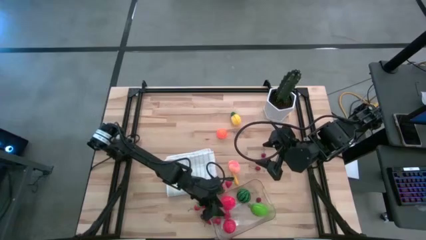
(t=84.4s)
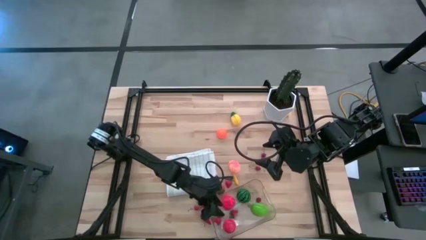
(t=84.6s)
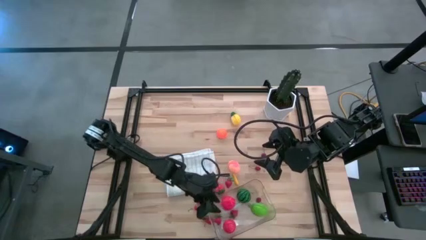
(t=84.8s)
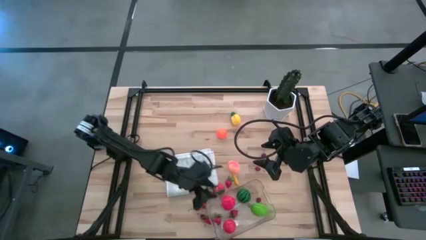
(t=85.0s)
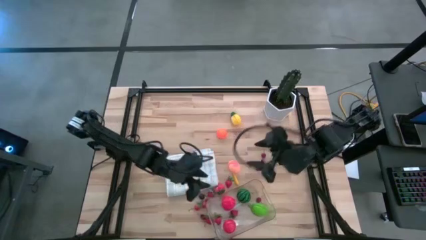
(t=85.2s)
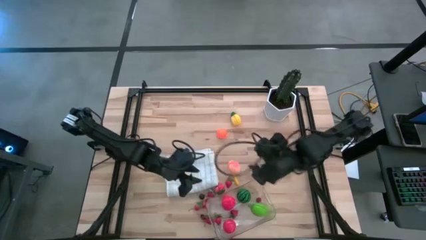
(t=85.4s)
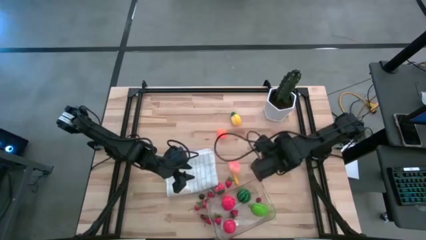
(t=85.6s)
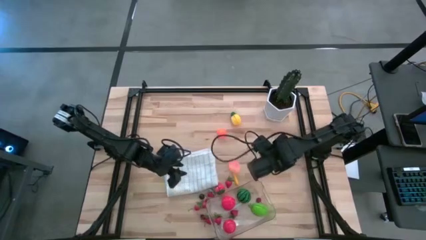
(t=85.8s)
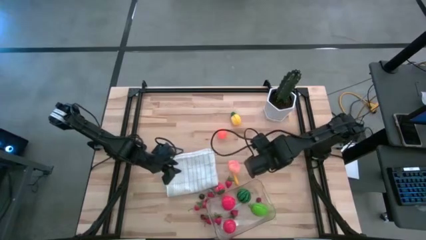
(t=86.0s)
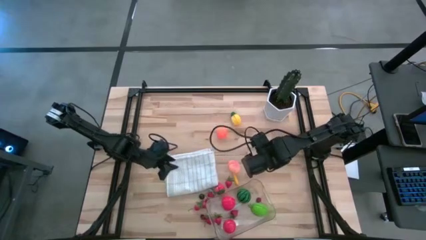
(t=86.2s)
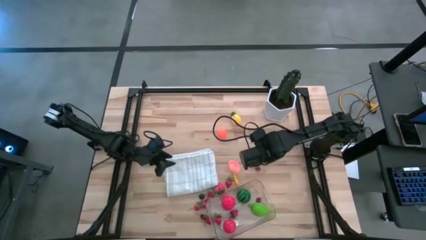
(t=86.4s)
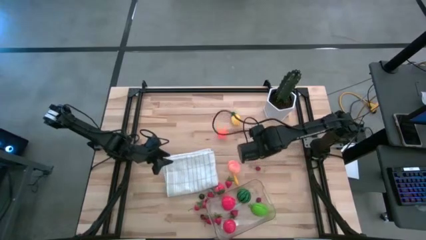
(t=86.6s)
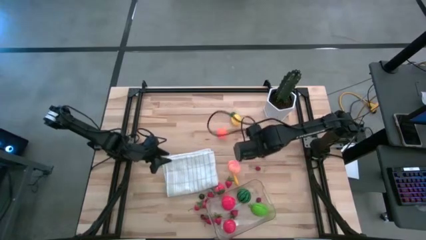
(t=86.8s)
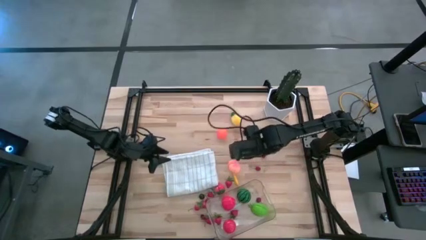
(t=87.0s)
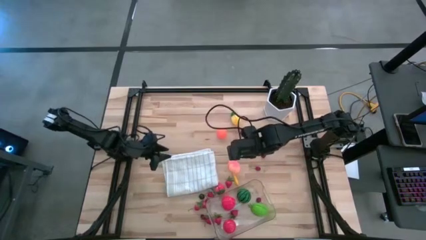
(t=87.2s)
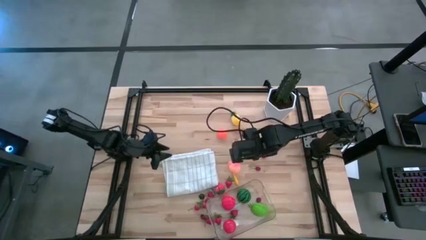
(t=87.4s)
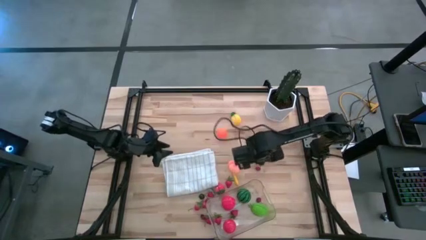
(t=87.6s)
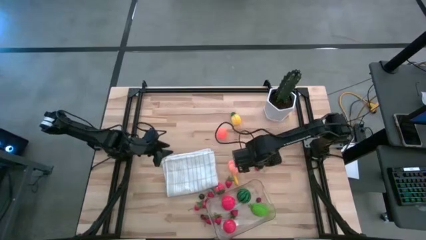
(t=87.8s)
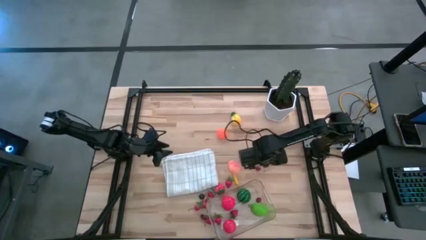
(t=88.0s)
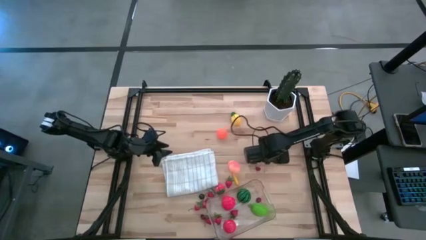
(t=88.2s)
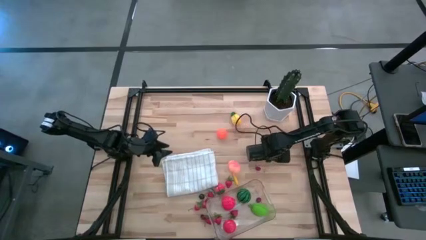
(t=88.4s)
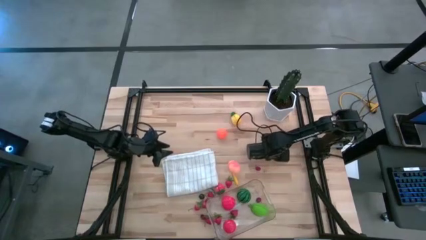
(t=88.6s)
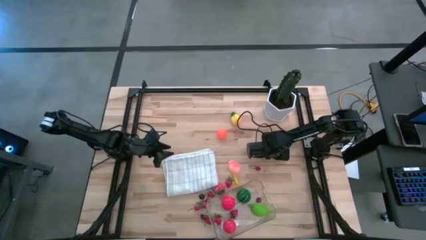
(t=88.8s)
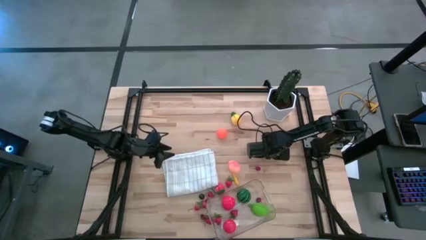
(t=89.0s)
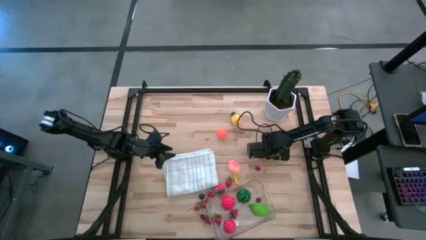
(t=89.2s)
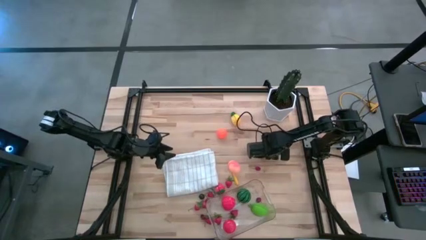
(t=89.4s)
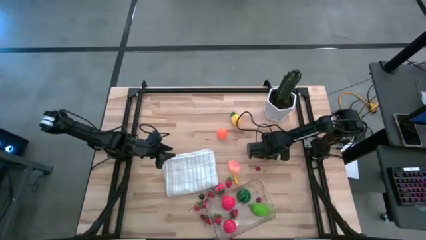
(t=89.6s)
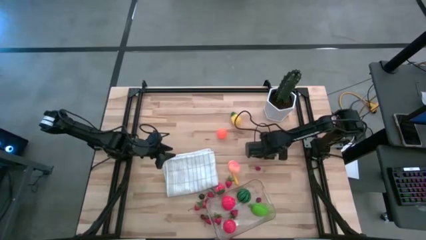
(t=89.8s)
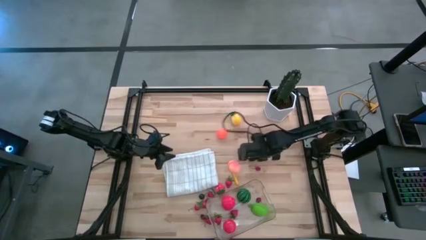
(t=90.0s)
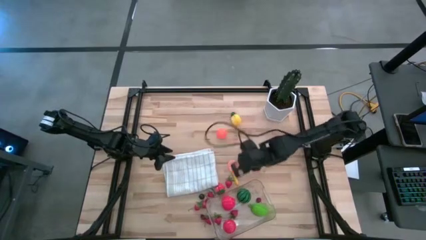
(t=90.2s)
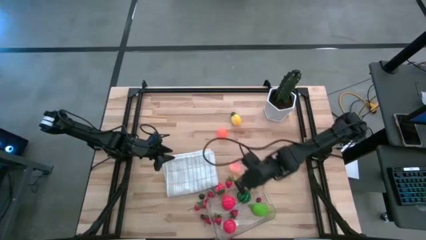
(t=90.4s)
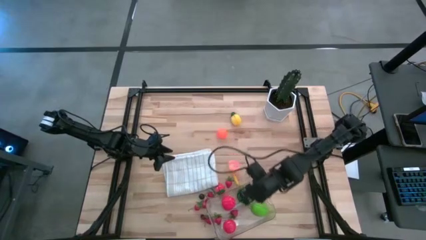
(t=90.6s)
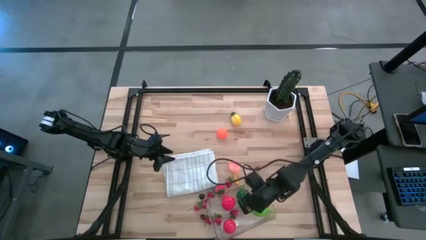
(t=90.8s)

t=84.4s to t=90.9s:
Task: Pick and placing Produce into tupperware
Put the red cherry into the transparent bin

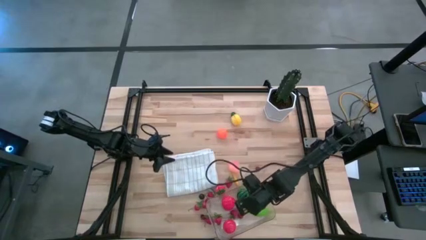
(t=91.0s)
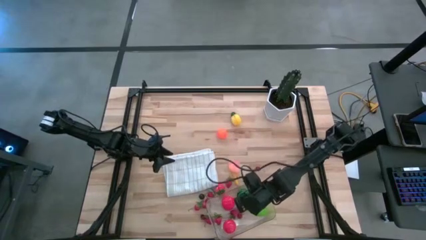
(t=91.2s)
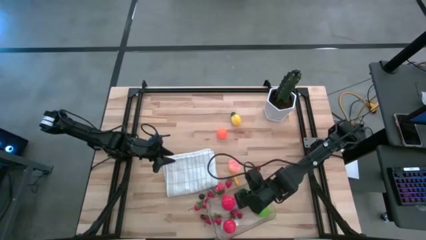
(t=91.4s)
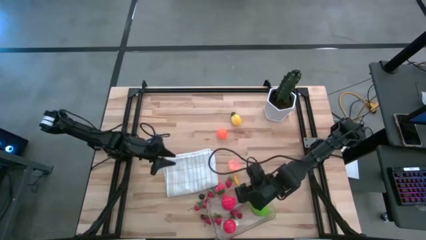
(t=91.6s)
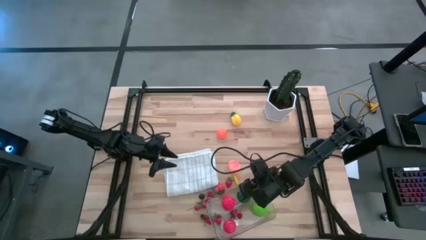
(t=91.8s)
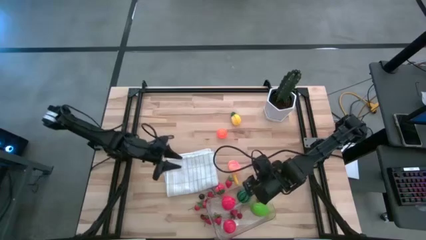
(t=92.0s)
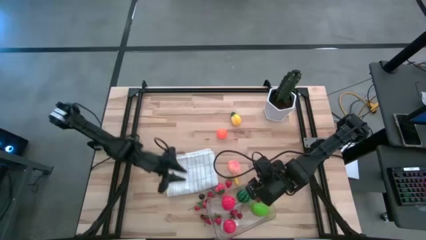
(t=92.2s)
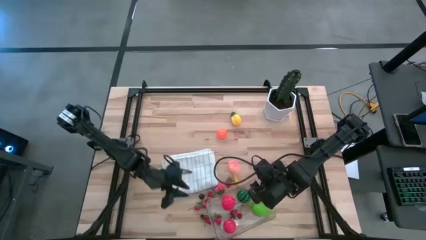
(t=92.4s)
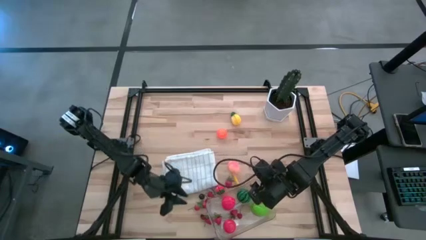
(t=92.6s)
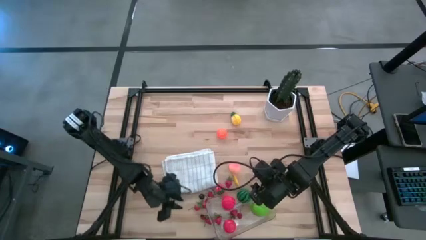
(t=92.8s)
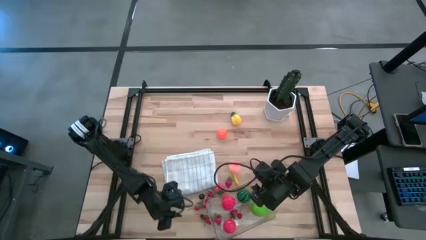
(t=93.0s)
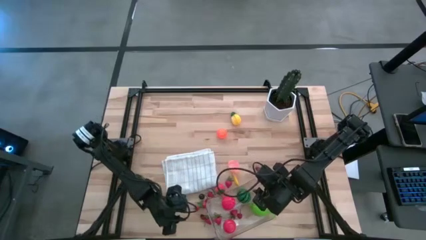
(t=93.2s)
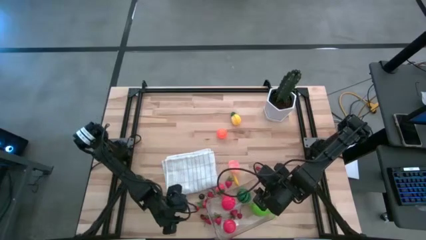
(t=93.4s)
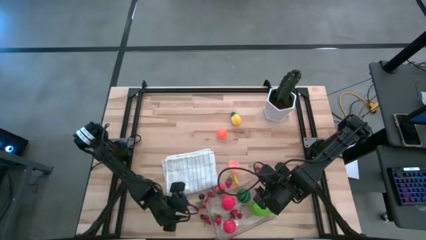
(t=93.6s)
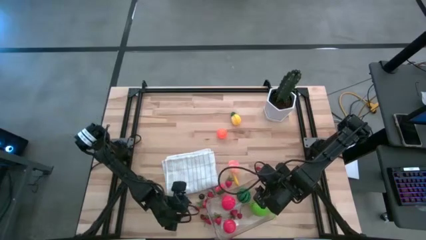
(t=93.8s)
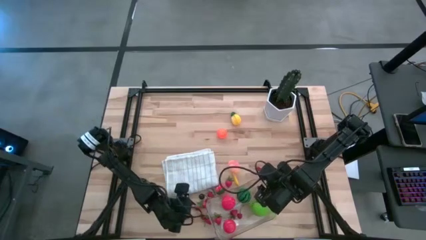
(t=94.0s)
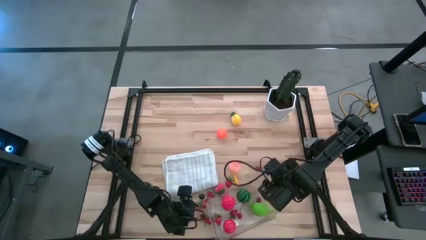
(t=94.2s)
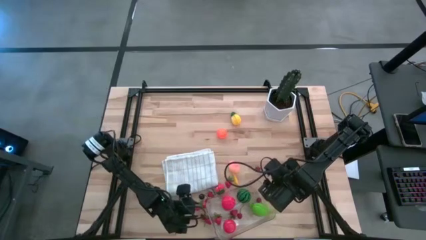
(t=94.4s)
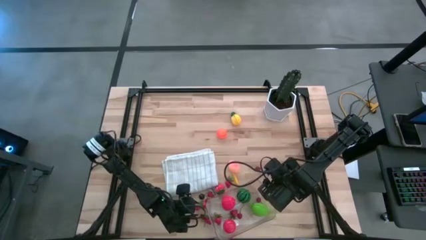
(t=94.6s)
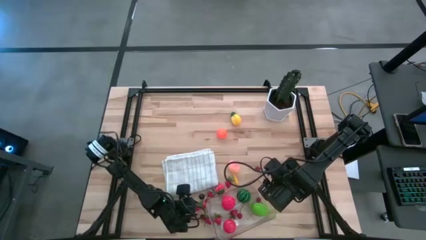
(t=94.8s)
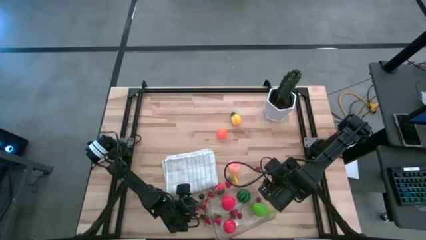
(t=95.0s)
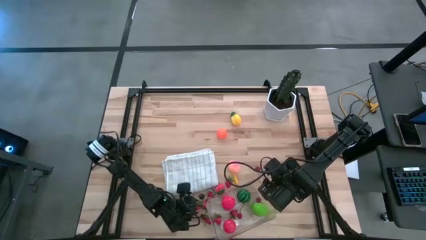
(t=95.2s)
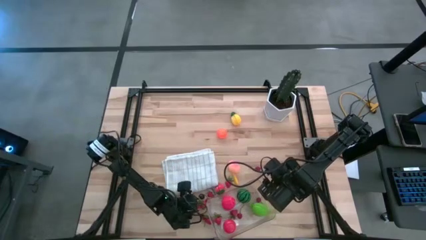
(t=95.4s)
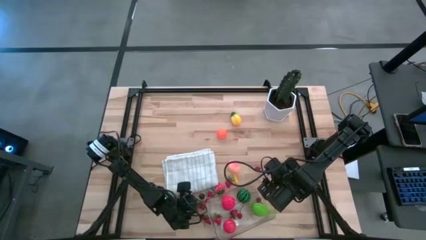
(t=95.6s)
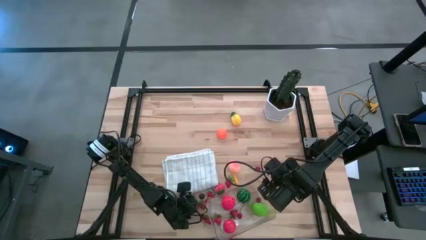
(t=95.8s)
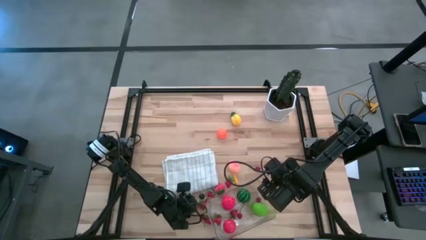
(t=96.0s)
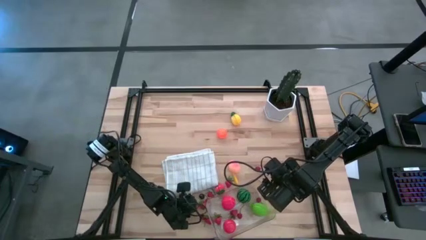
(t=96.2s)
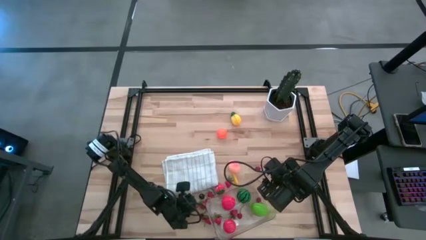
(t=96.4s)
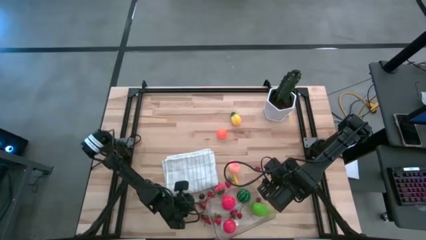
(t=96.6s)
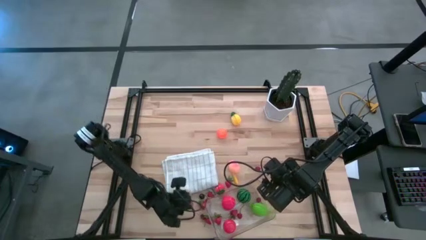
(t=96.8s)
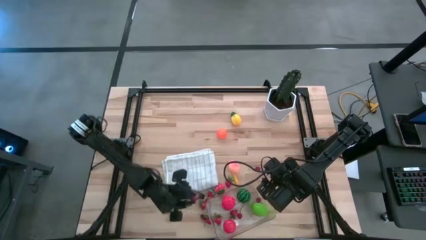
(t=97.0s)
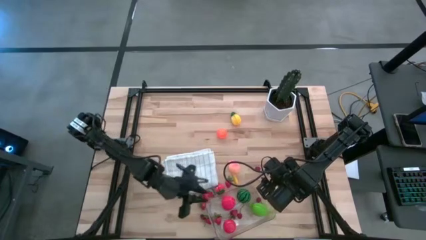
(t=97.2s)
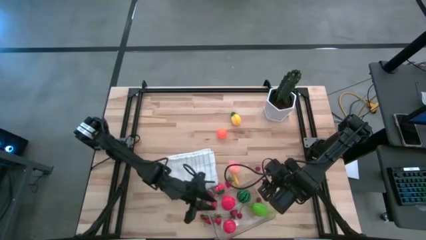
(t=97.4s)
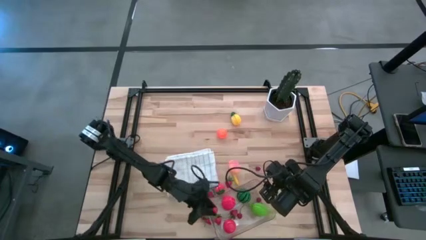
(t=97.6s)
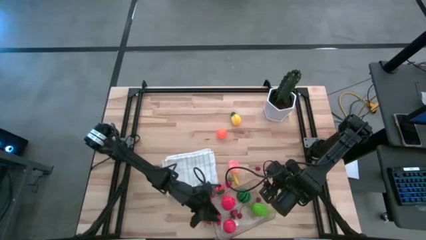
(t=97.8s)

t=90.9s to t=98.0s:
Put the red cherry into the transparent bin

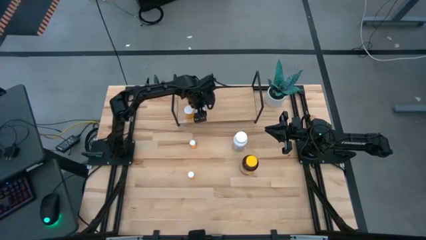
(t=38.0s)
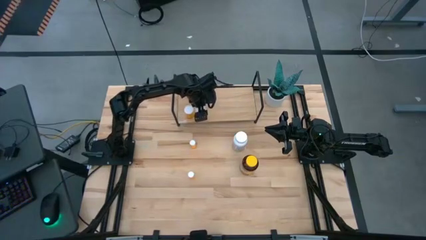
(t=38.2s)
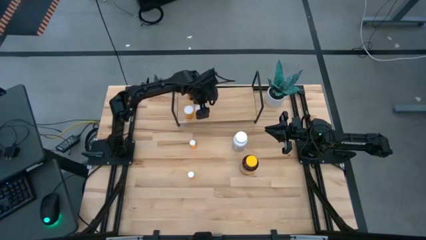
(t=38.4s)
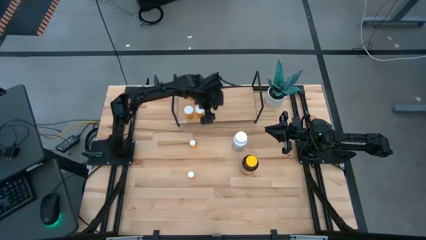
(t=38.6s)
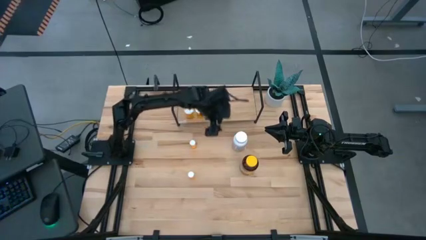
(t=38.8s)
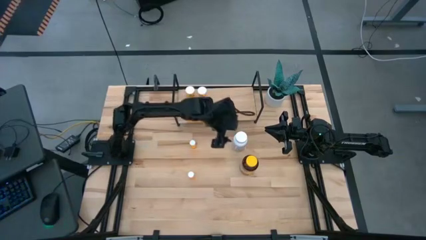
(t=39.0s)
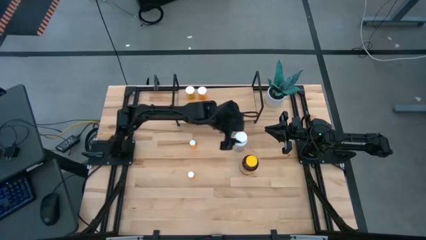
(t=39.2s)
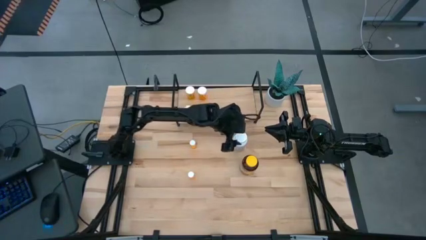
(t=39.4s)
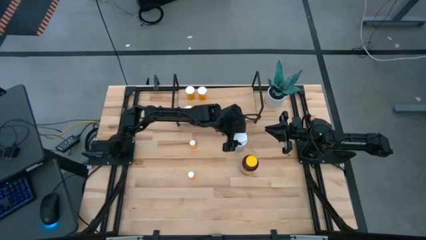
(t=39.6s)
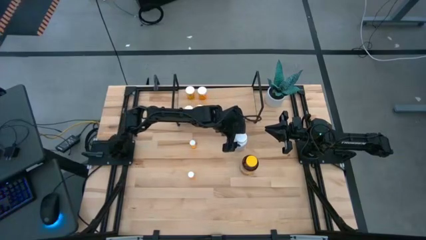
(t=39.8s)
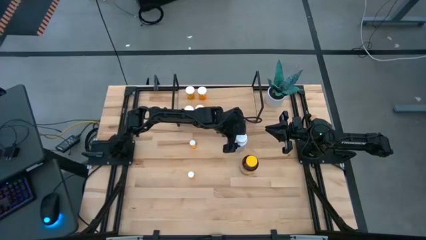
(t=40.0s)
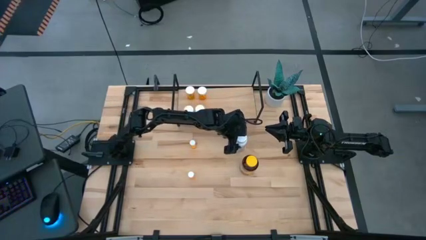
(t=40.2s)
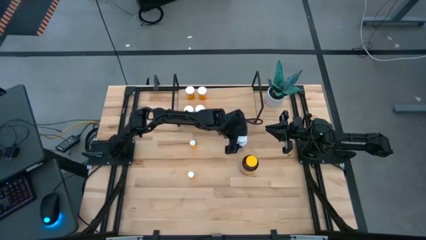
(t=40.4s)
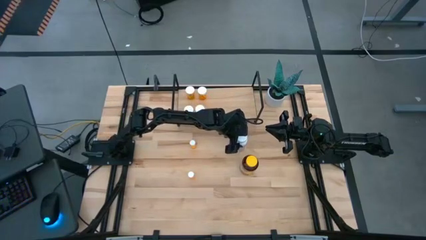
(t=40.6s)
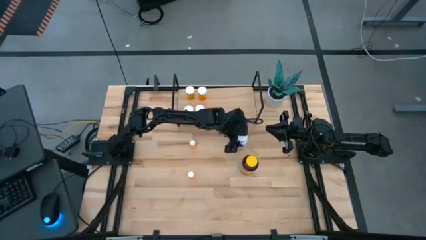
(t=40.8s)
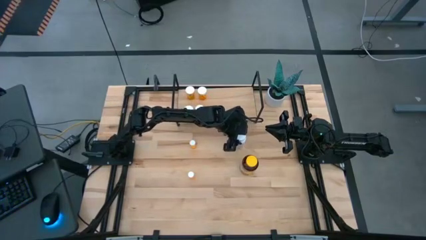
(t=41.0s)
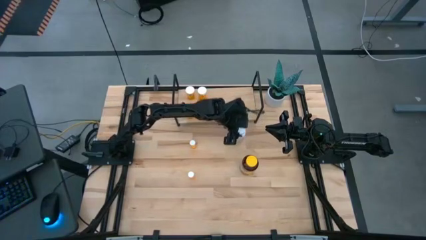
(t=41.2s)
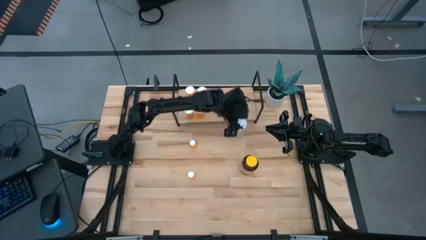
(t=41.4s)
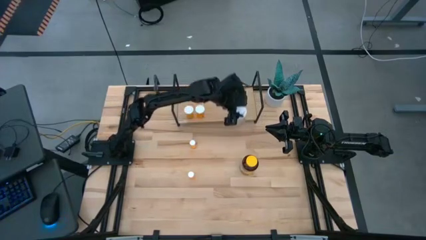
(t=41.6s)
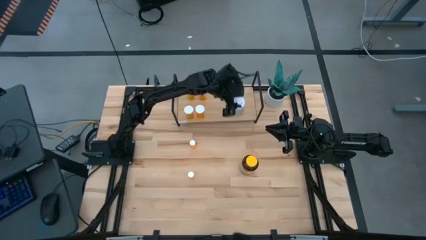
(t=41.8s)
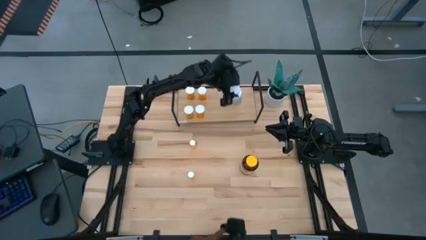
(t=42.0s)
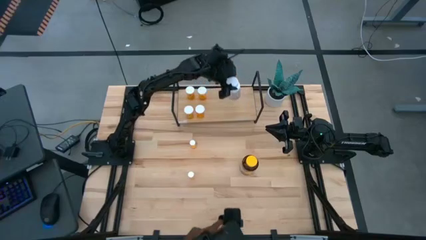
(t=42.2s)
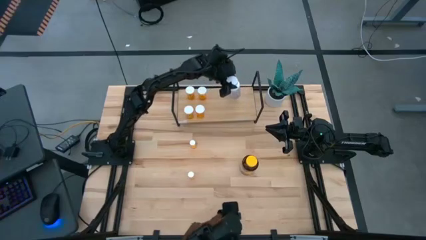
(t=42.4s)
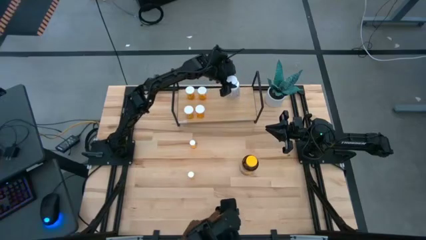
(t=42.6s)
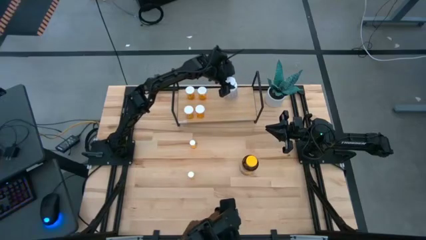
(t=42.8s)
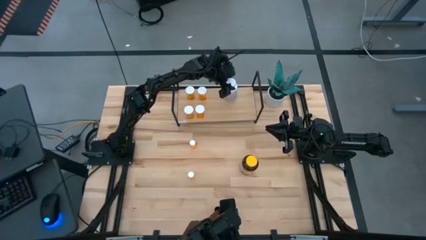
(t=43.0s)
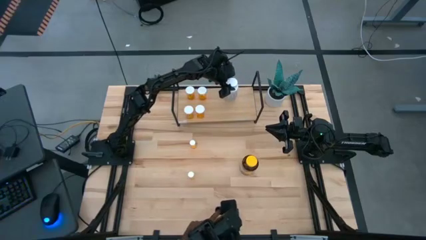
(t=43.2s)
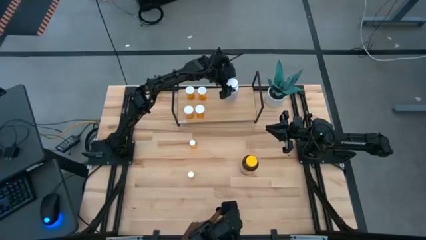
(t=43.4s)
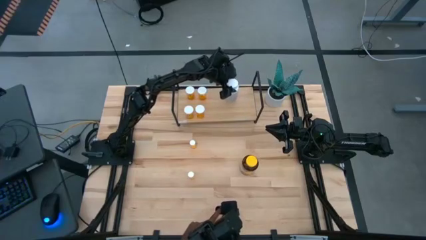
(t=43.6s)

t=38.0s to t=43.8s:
Task: Pick and place medicine bottles onto shelf by color
Put the white pill bottle on the shelf
